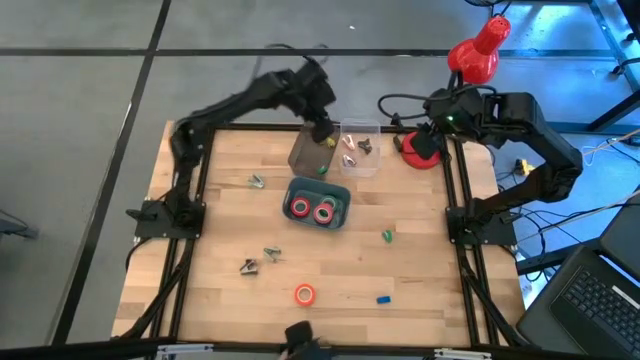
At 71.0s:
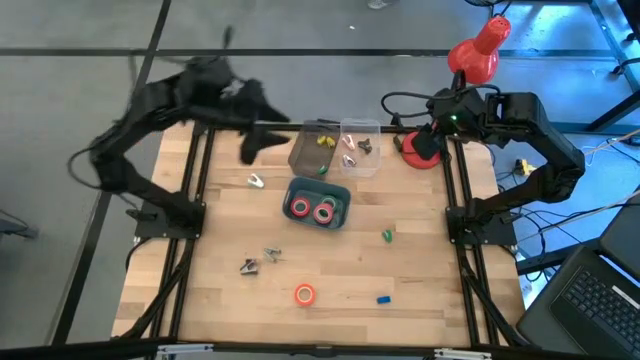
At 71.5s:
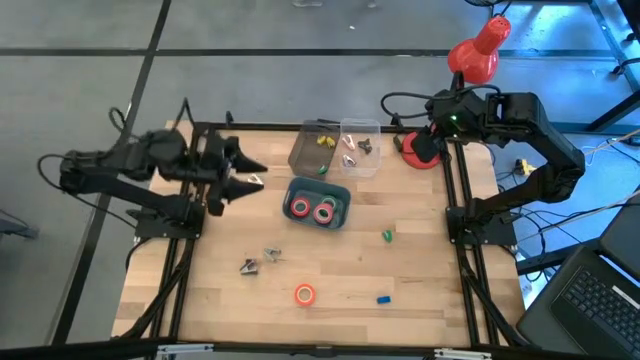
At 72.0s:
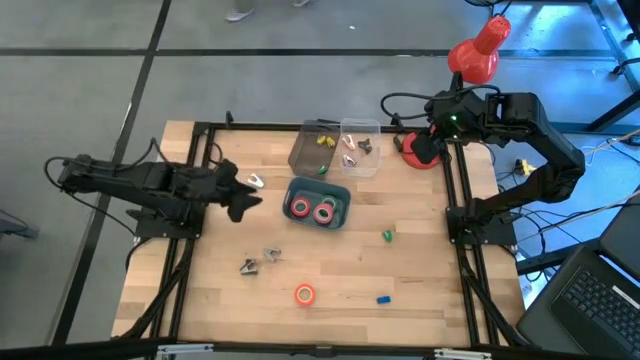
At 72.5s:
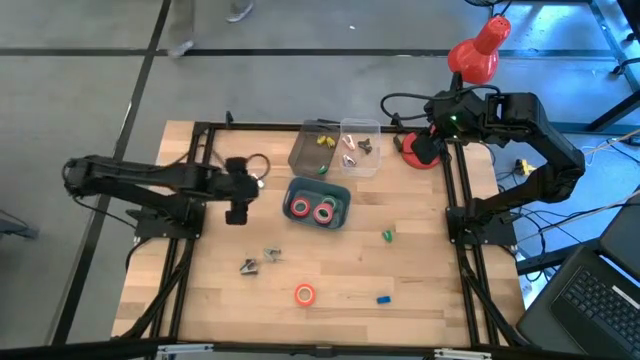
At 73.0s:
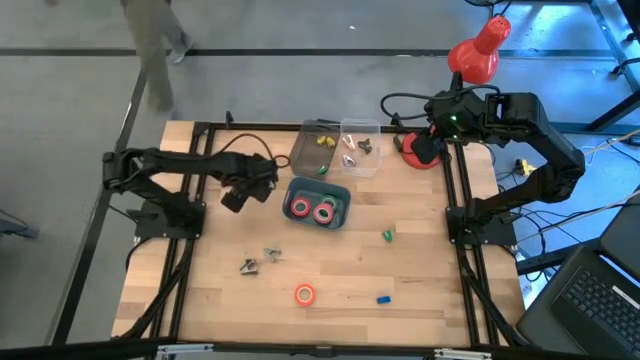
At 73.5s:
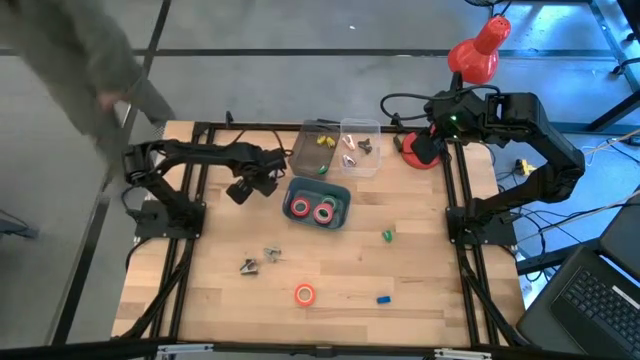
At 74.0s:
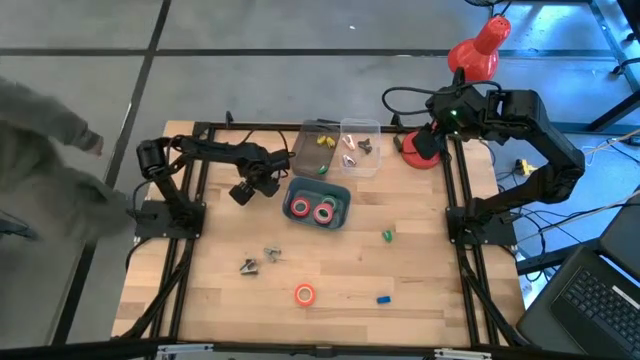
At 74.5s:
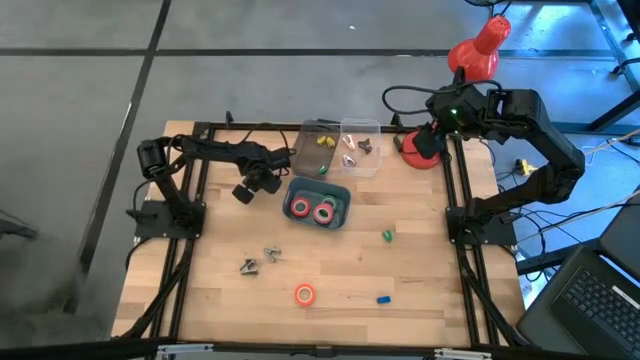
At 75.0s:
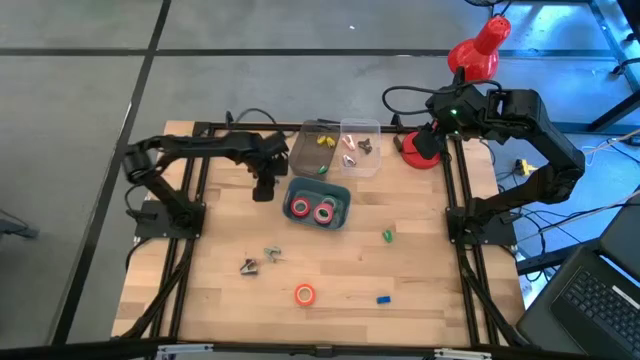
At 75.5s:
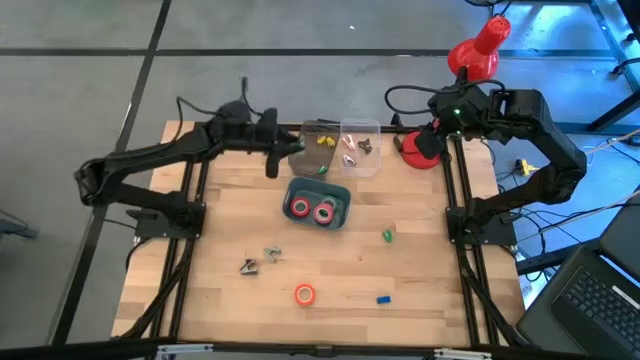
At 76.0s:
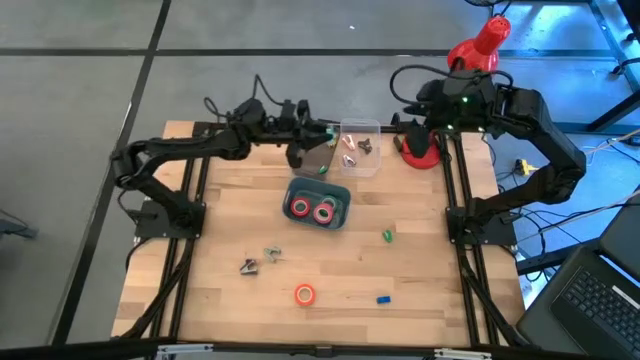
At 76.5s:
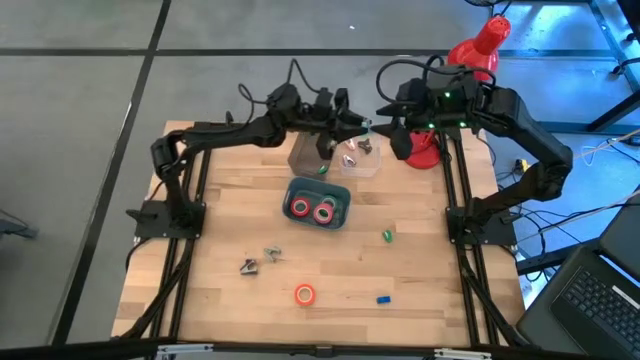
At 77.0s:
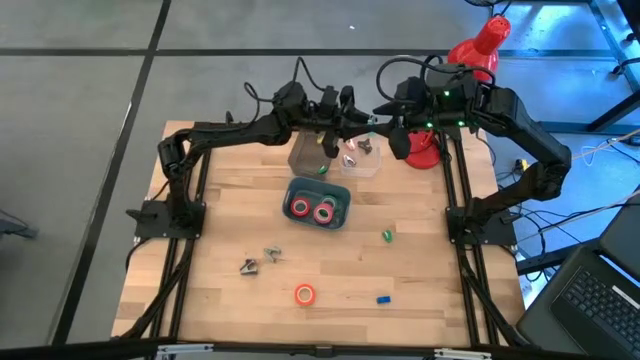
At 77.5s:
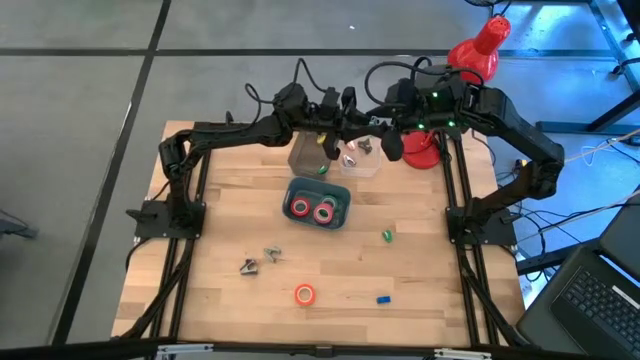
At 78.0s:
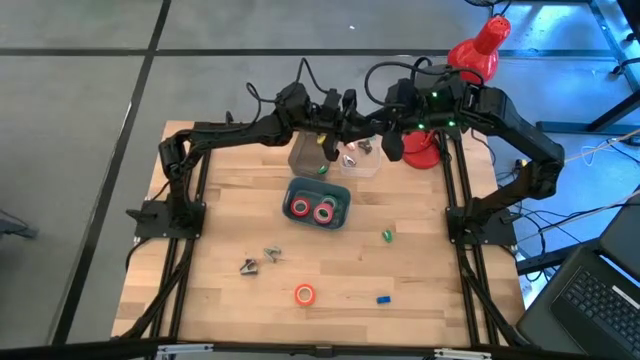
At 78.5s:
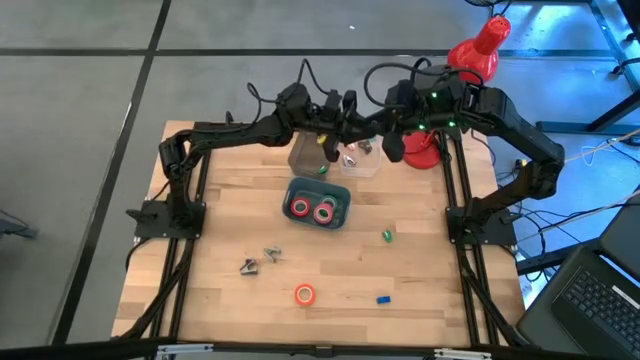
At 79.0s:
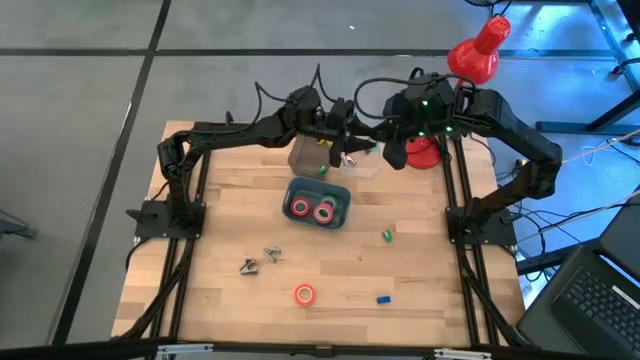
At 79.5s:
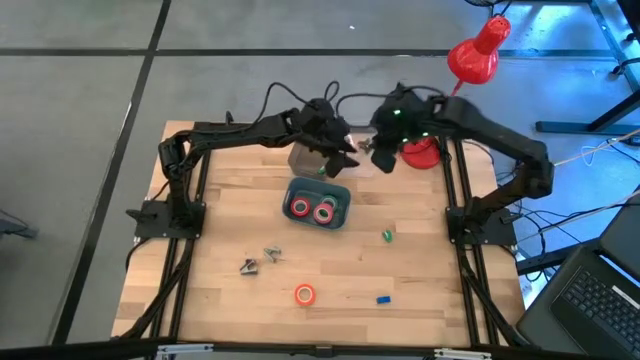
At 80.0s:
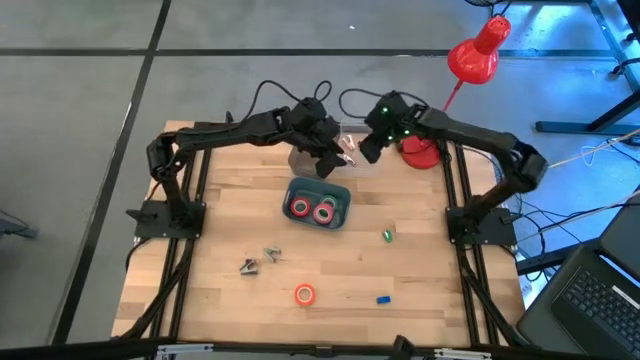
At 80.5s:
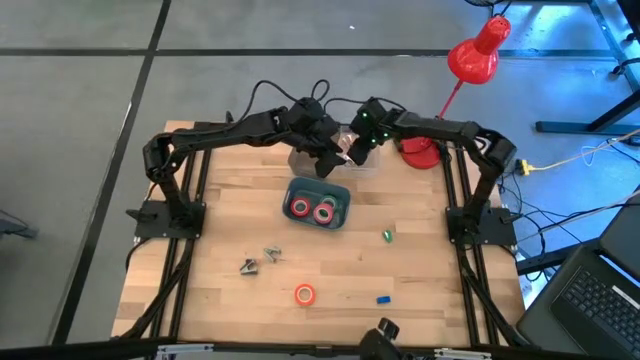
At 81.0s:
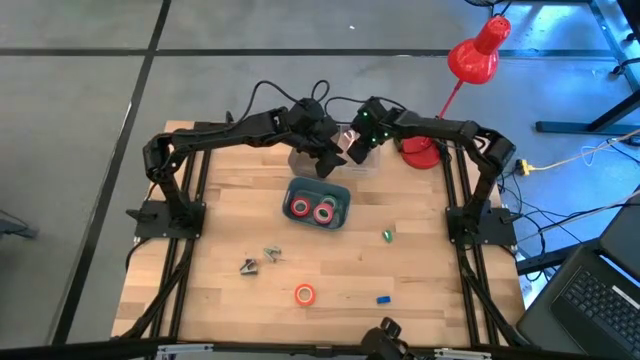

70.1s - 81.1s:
Task: Pick and place Stapler, Stapler remover, tape
Put the light blue staple remover into the white bin

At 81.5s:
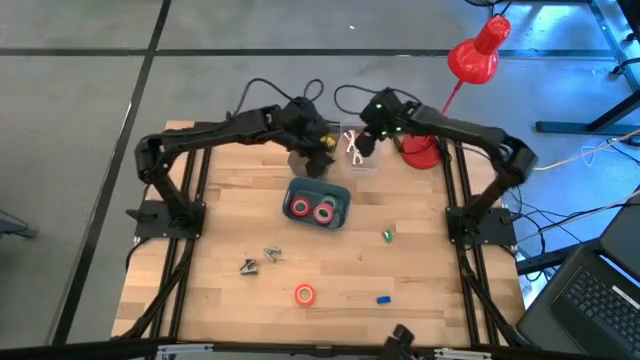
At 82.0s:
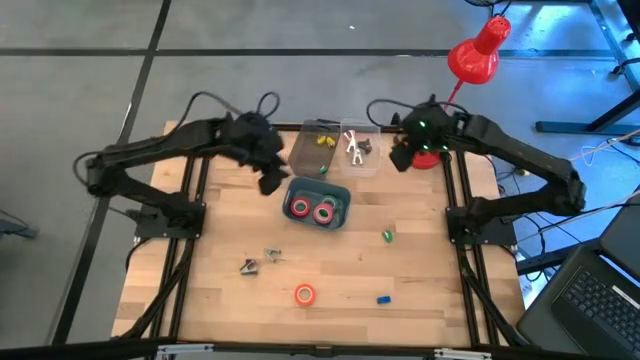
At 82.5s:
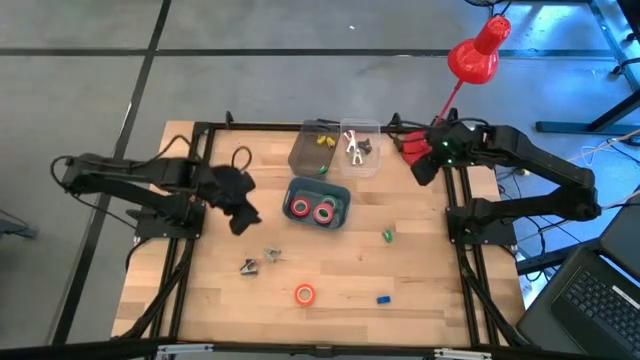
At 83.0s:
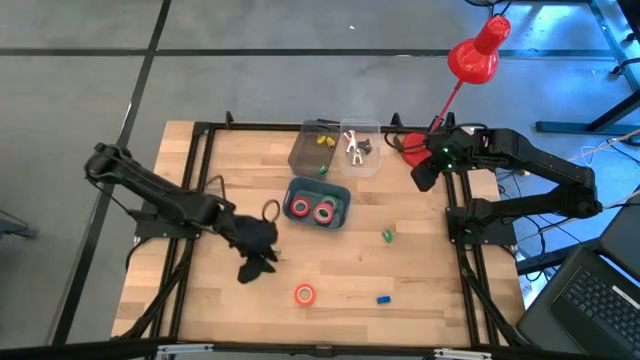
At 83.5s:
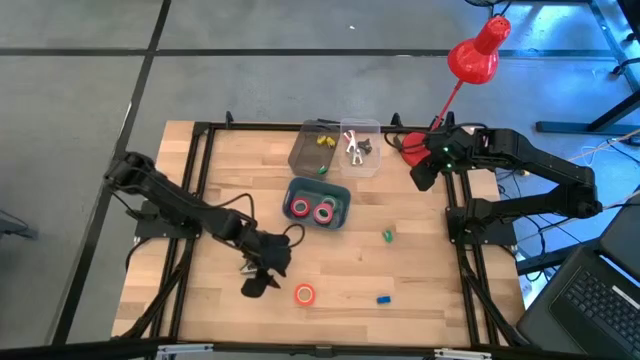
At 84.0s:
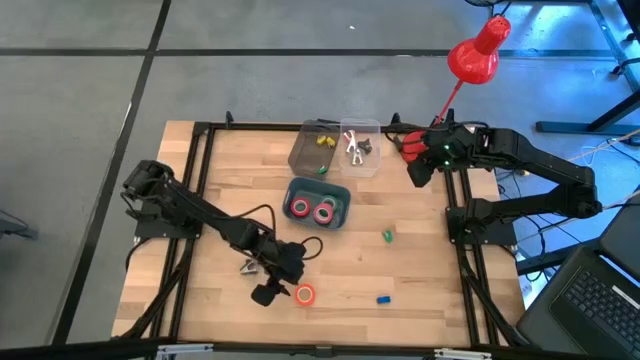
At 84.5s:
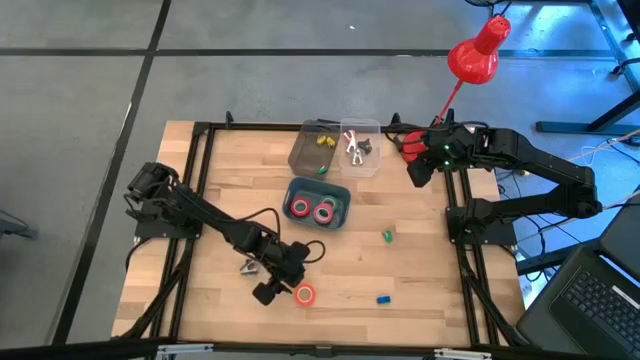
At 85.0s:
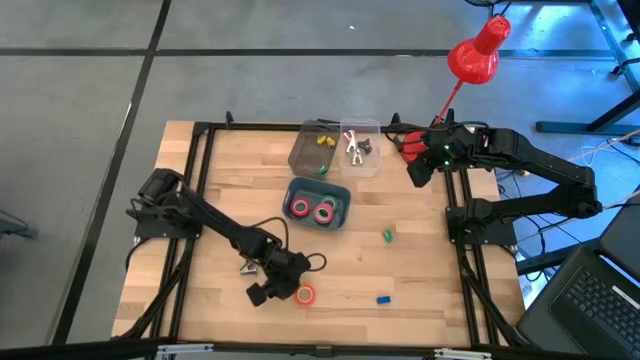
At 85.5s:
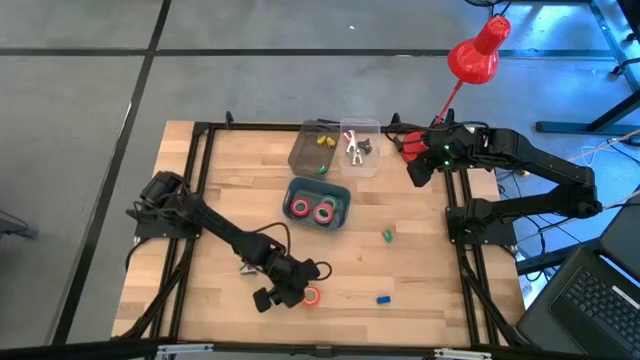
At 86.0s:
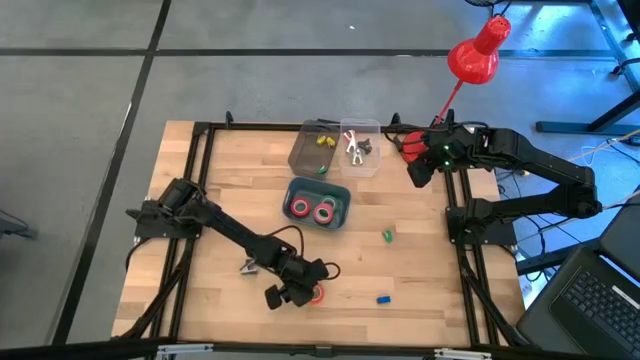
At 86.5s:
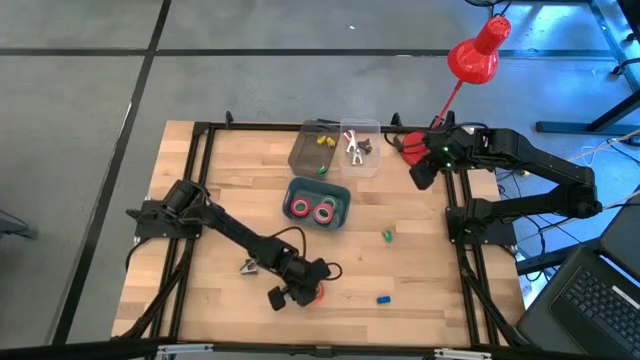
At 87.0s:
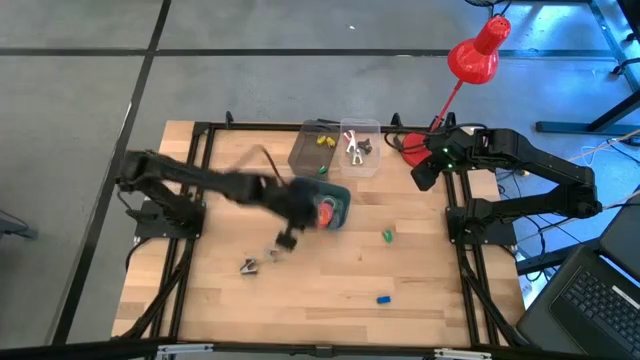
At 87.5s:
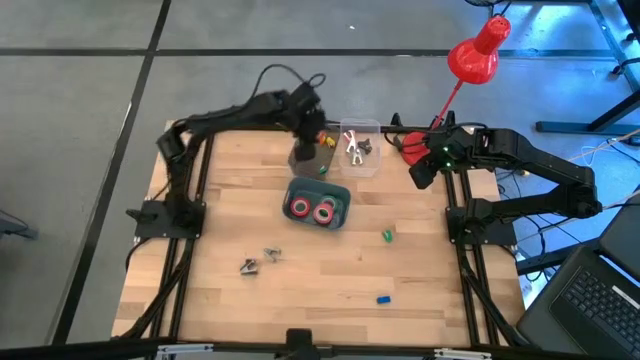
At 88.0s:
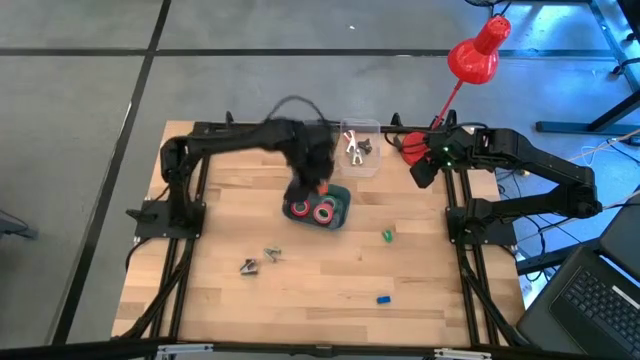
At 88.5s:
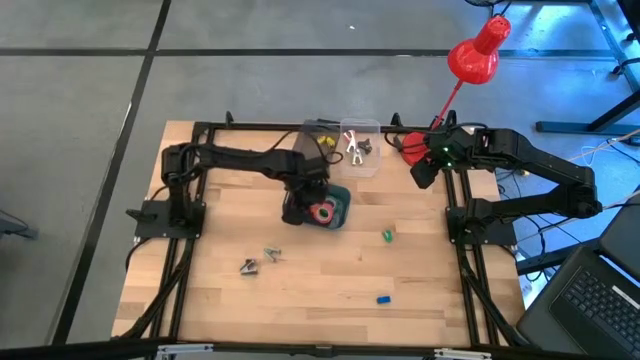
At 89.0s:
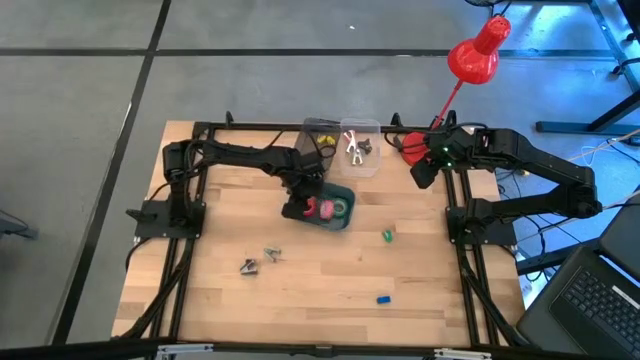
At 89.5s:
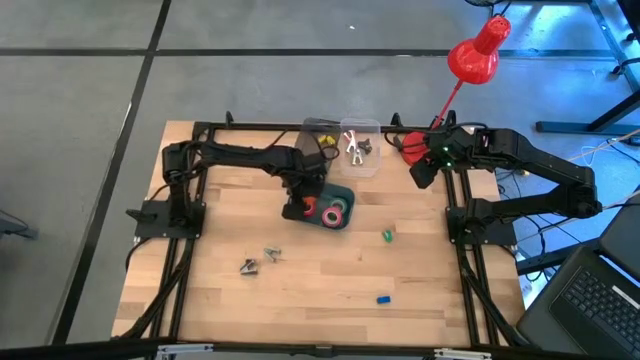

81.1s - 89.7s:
Put the orange tape into the blue bin

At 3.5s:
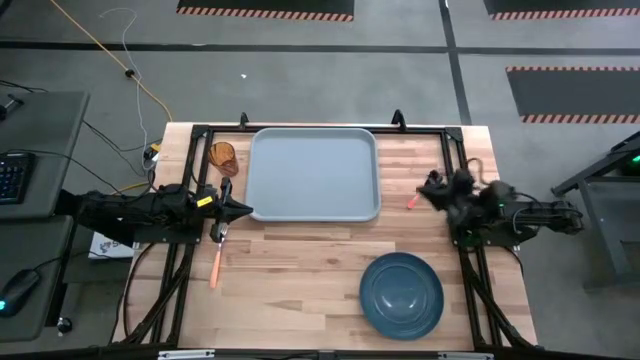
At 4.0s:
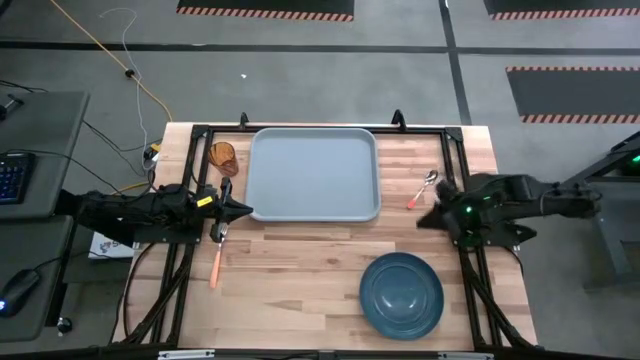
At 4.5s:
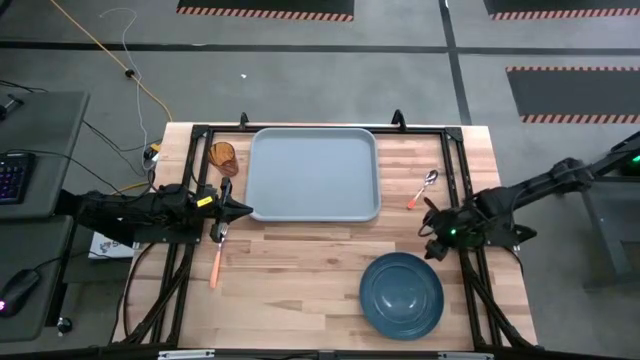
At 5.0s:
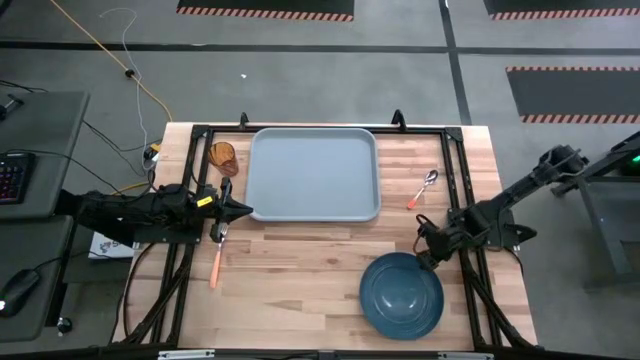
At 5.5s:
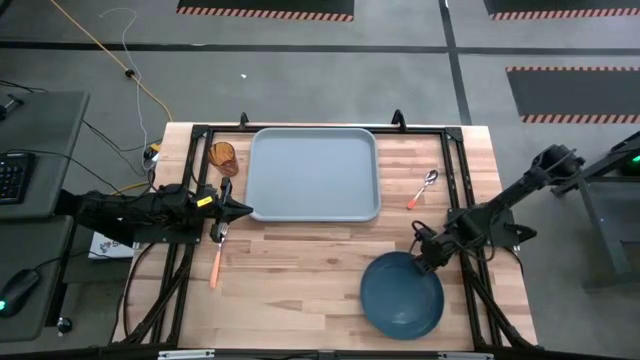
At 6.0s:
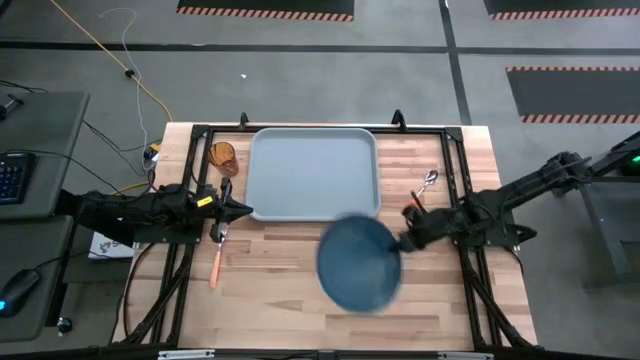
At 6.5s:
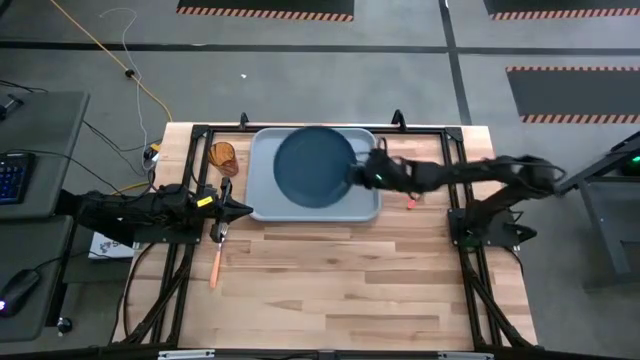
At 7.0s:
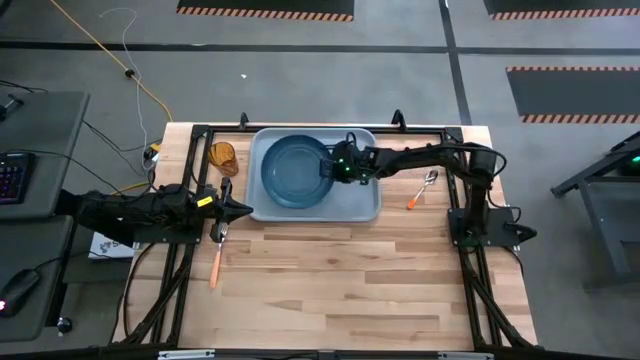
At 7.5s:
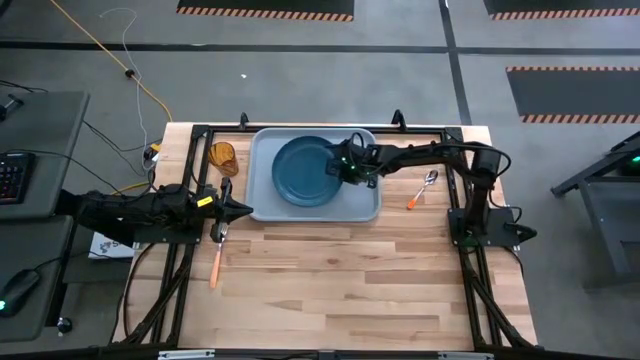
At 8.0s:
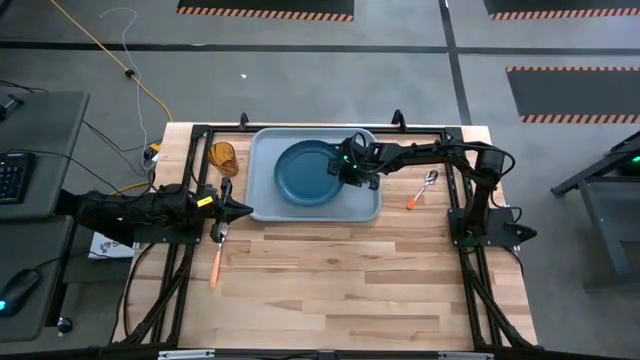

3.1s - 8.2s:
Task: Pick and place plate/cup/fork/spoon on tray
Put the blue plate on the tray
